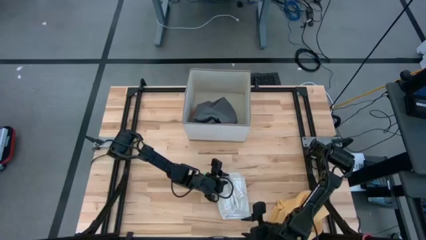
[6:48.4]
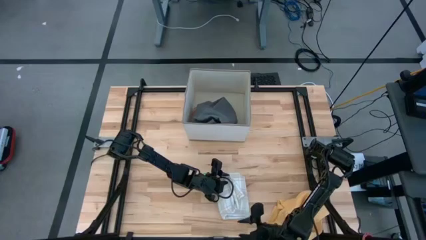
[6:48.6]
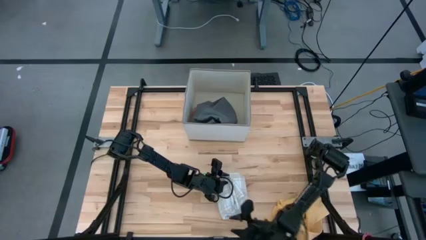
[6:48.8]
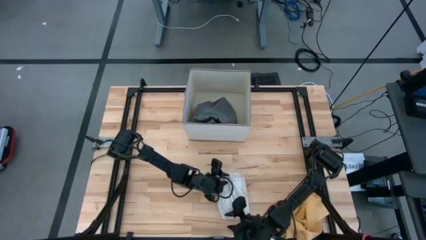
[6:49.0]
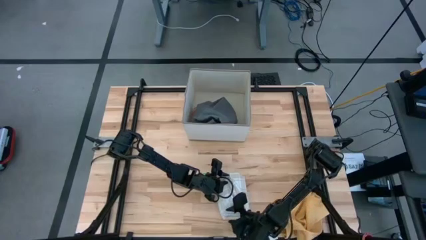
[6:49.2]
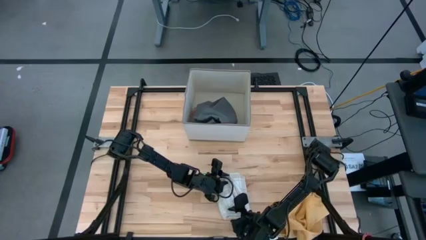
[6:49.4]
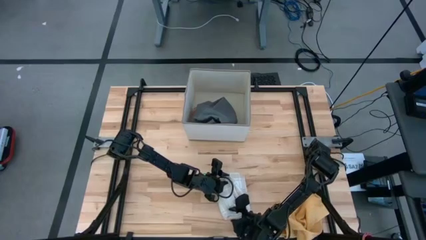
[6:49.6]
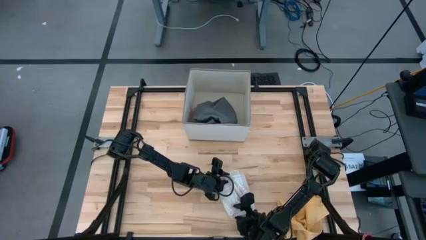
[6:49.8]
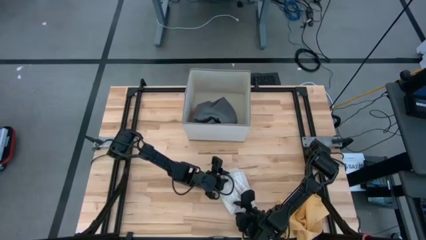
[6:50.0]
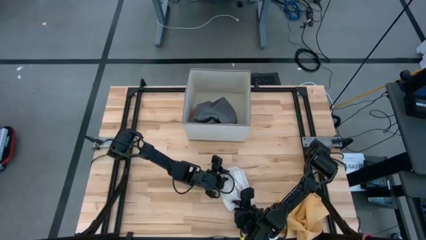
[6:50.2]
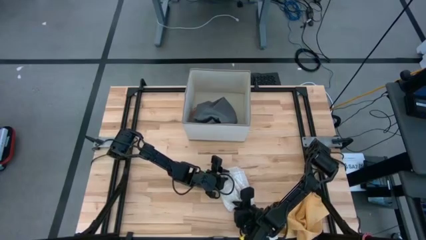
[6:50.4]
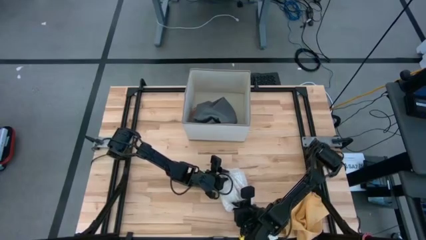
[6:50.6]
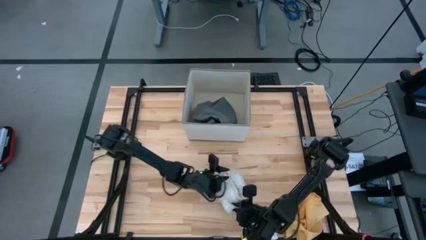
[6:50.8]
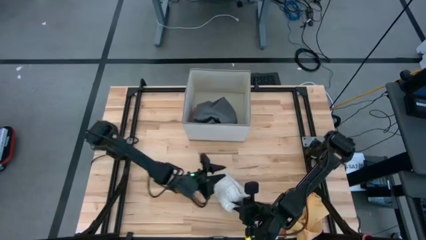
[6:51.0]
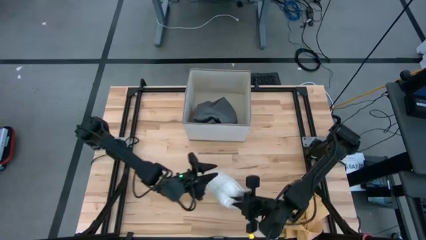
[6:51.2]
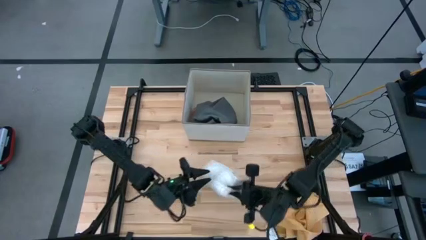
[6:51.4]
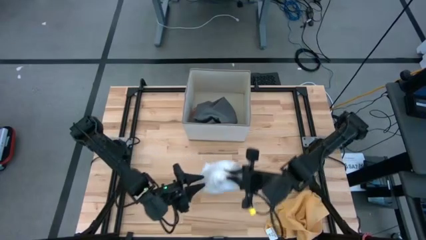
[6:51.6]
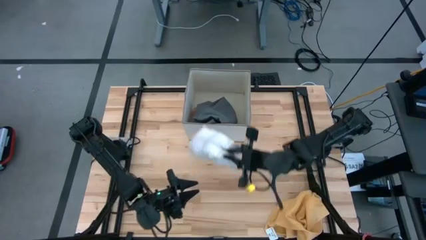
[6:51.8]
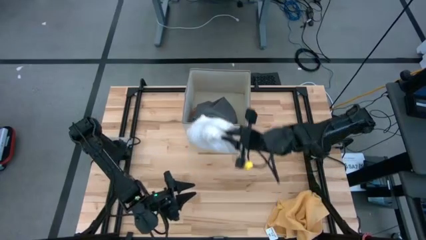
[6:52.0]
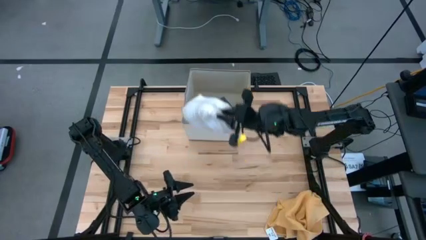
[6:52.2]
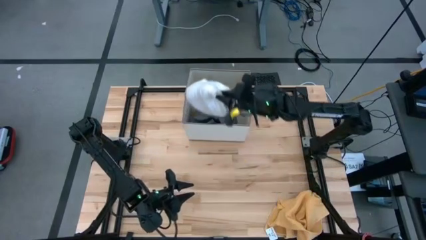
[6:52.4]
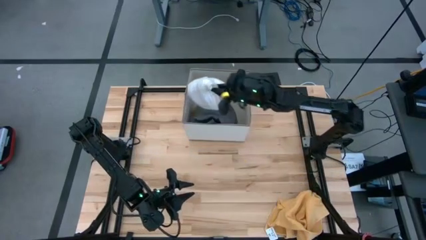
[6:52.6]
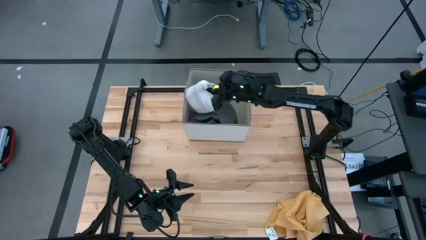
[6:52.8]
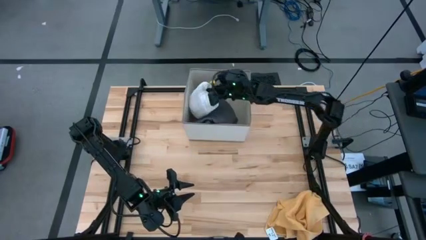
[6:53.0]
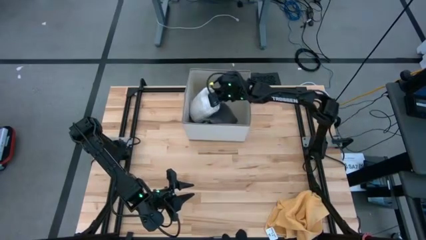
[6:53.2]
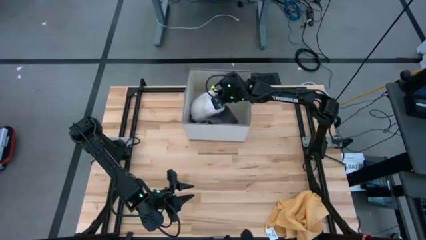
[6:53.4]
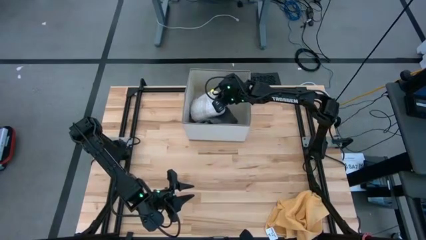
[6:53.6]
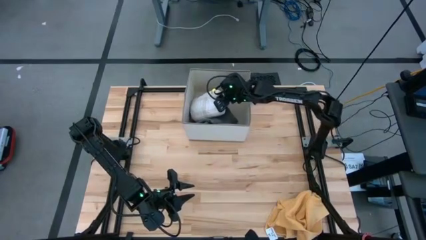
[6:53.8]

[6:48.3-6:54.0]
Task: Fold towel
Put the folded white patterned towel into the laundry organizer
